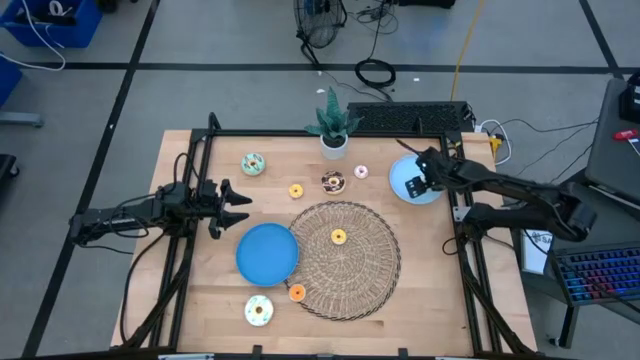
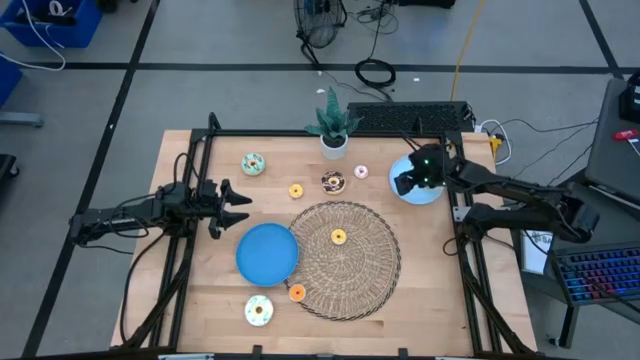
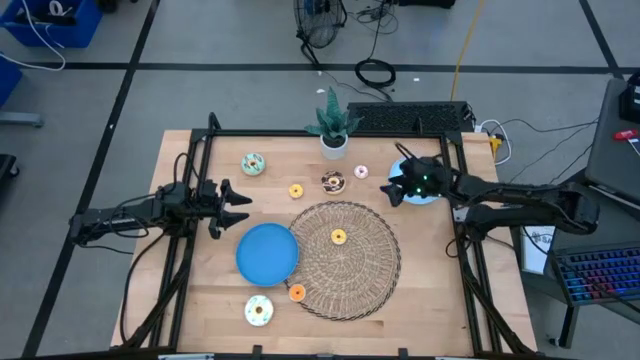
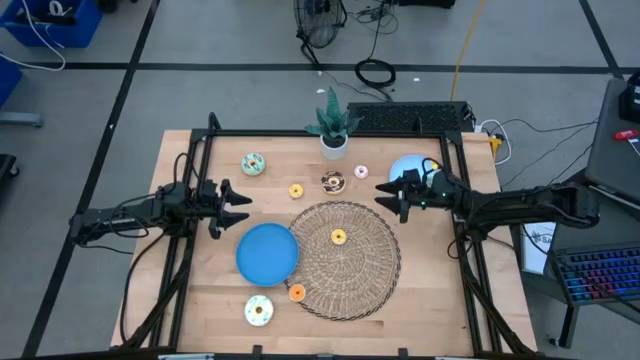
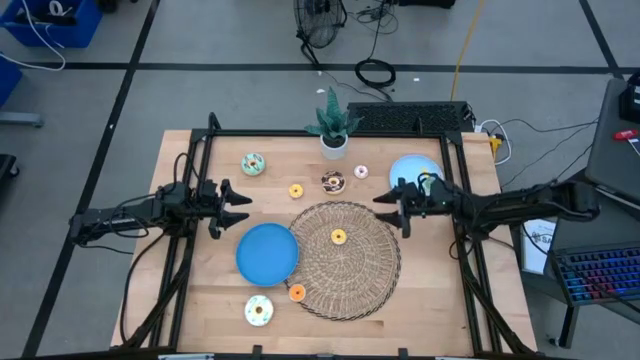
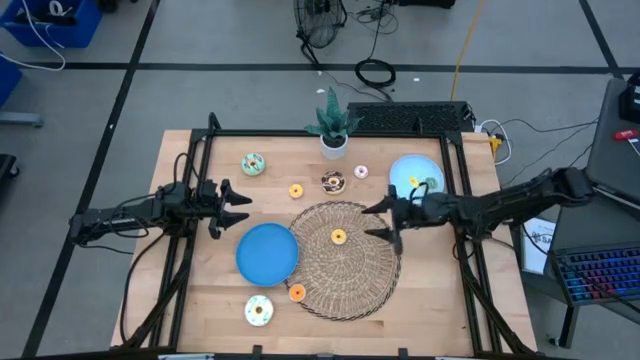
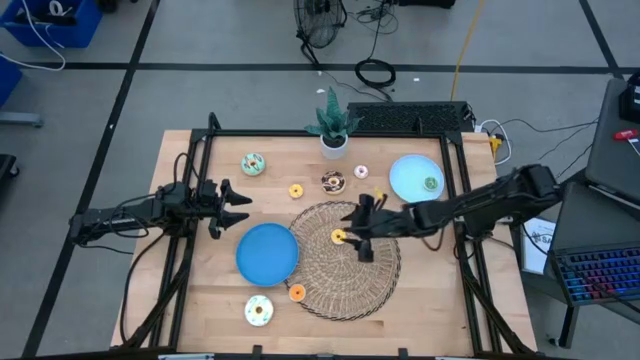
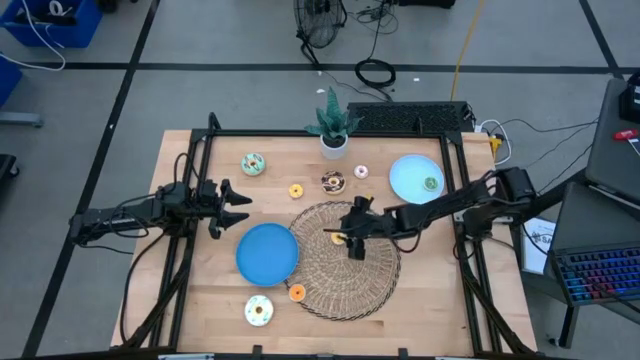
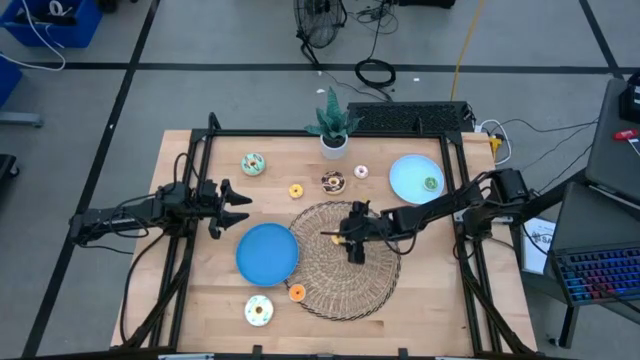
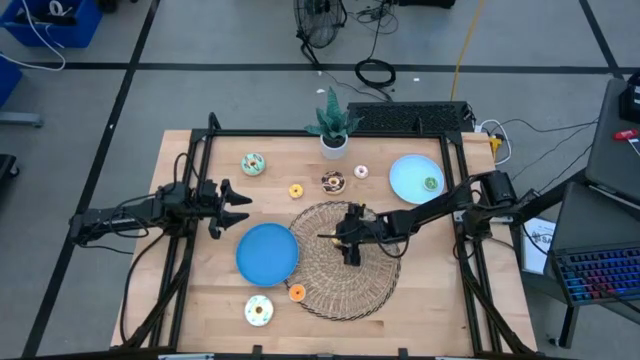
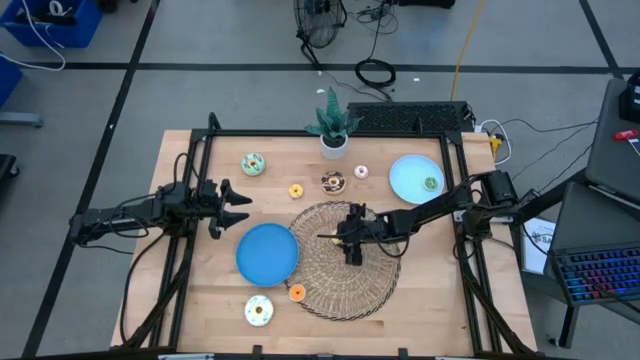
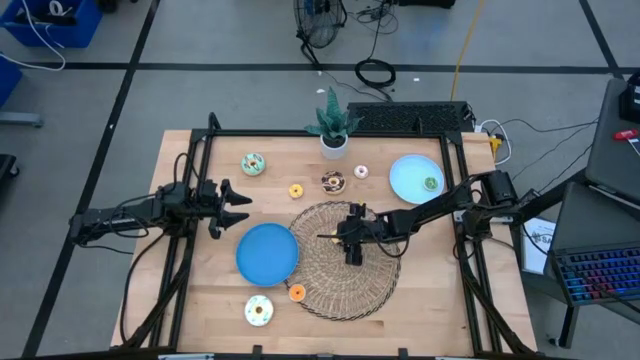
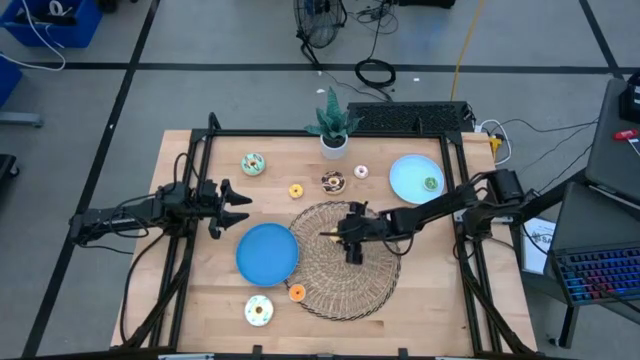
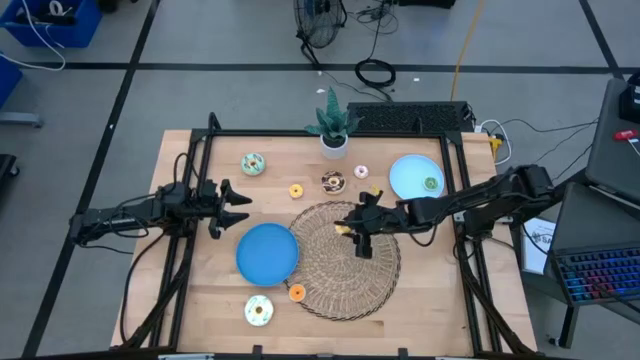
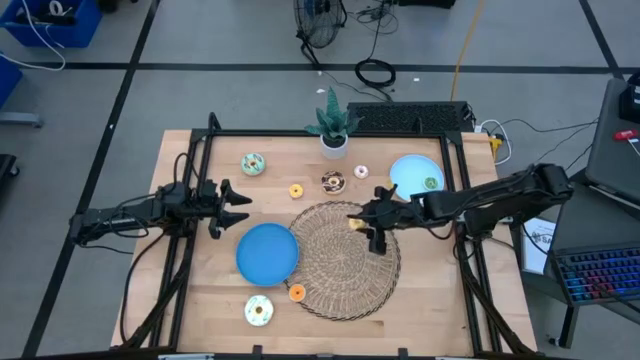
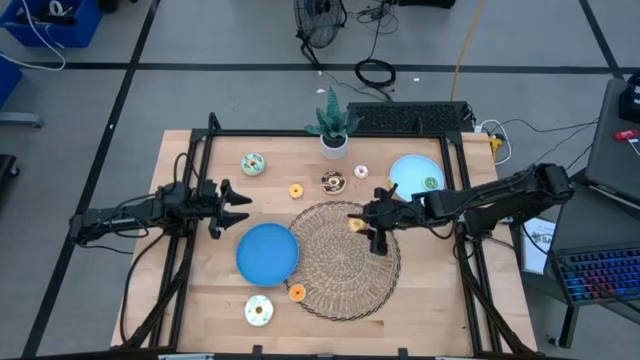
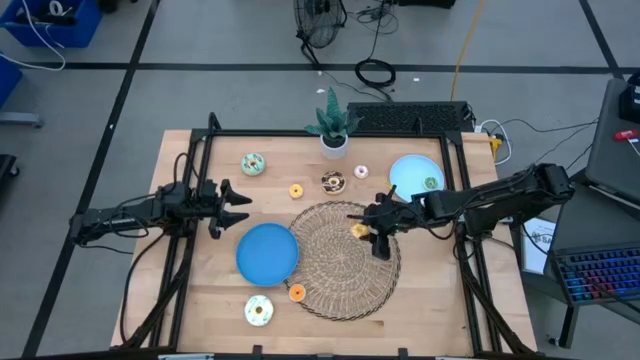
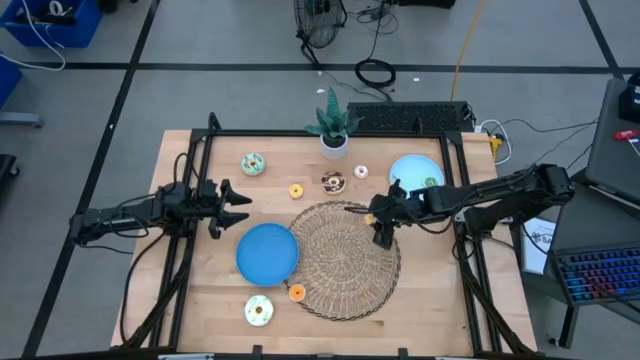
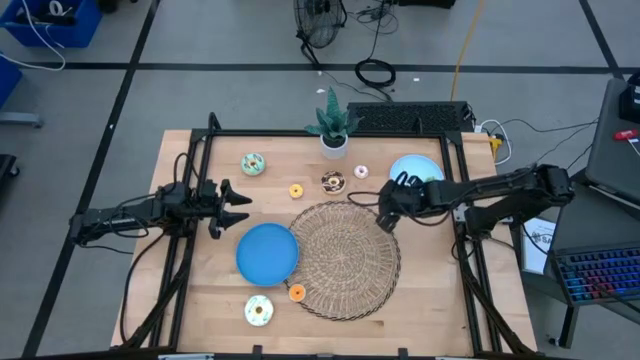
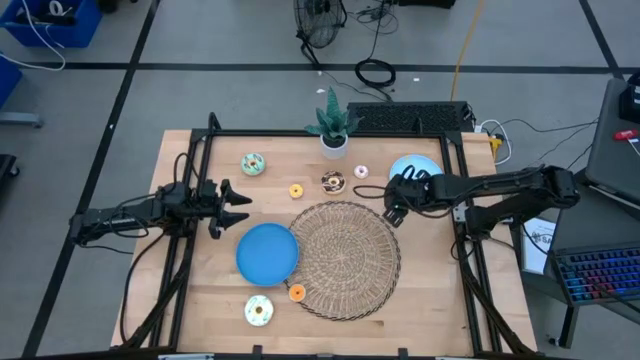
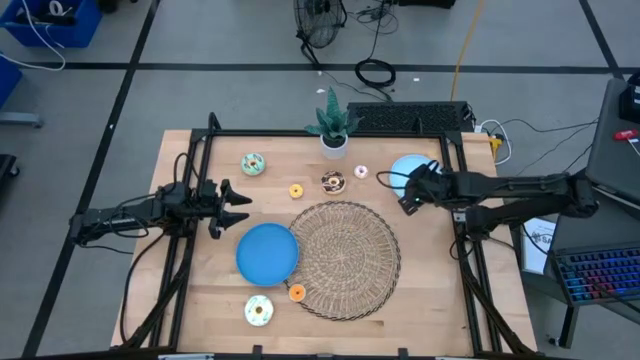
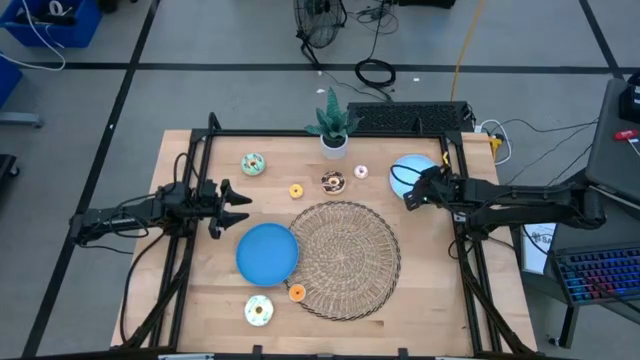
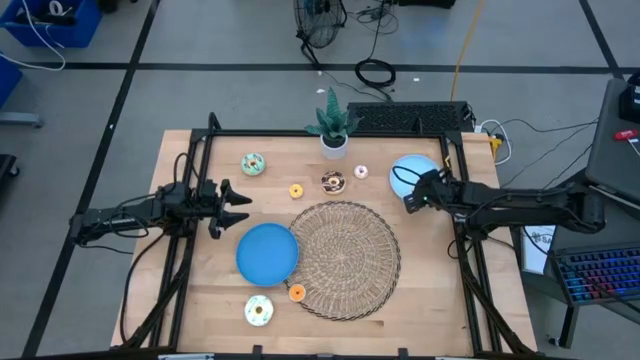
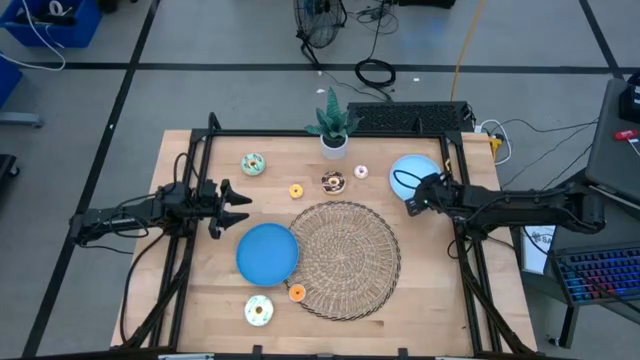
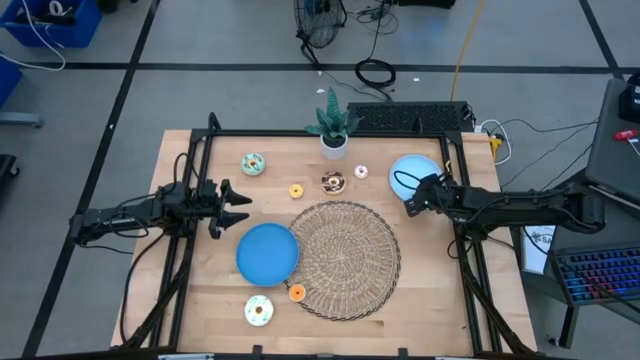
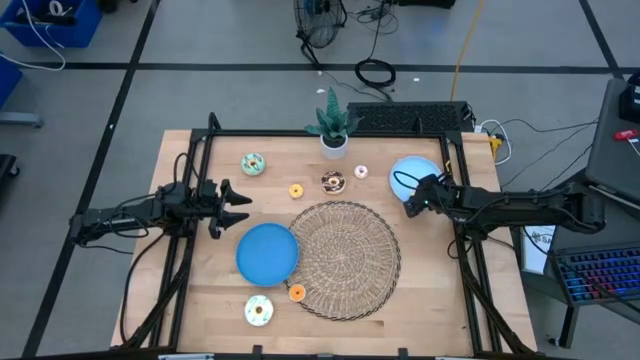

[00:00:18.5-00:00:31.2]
Task: Pick & Place donuts
Put the bottom small yellow donut on the light blue plate

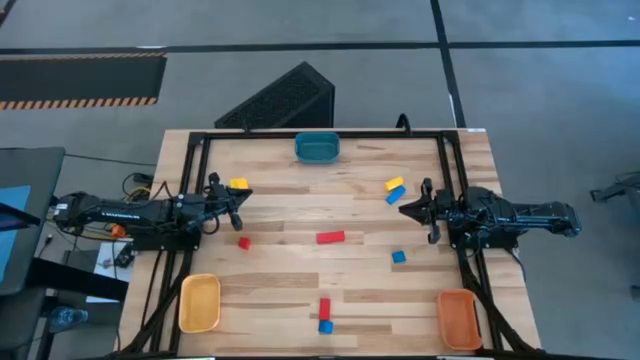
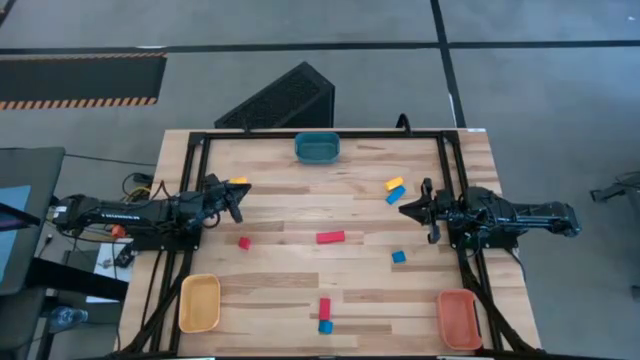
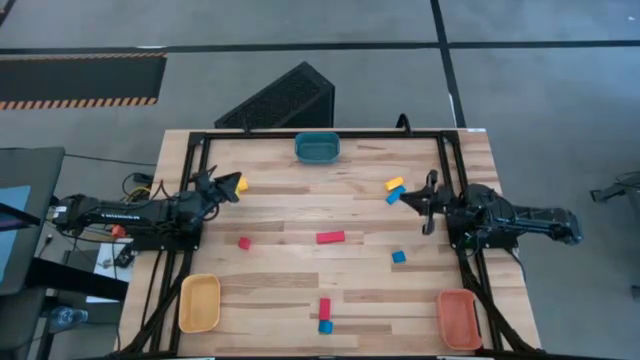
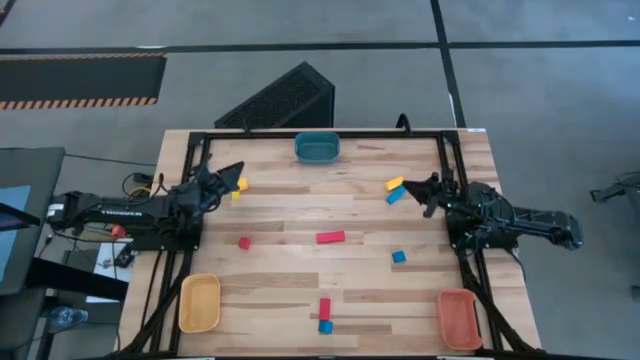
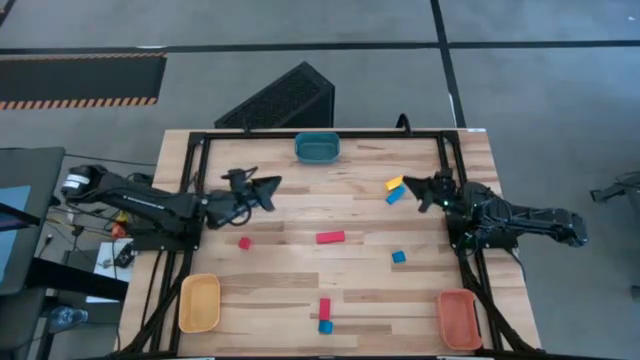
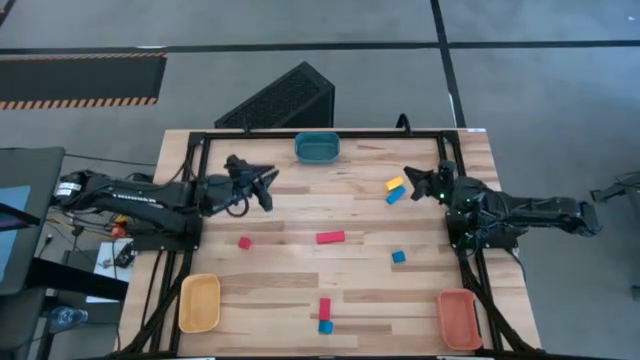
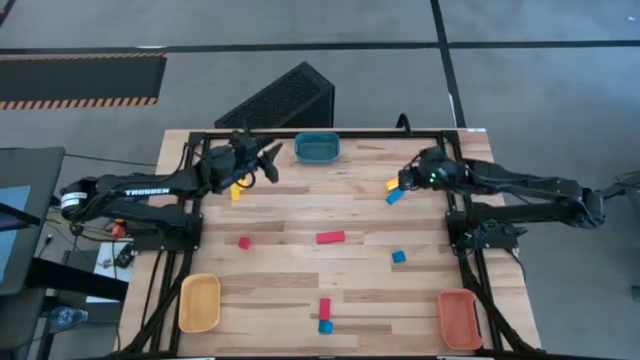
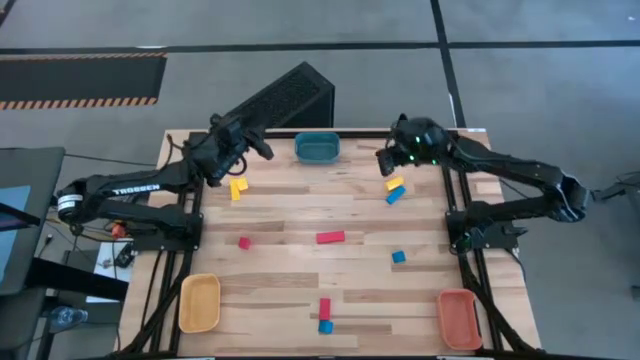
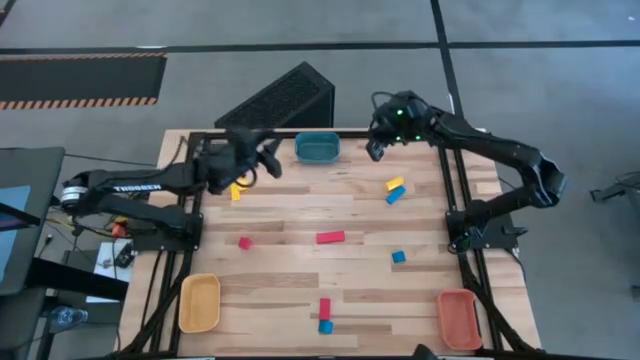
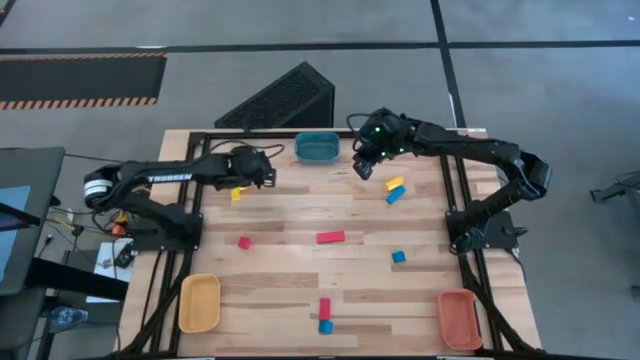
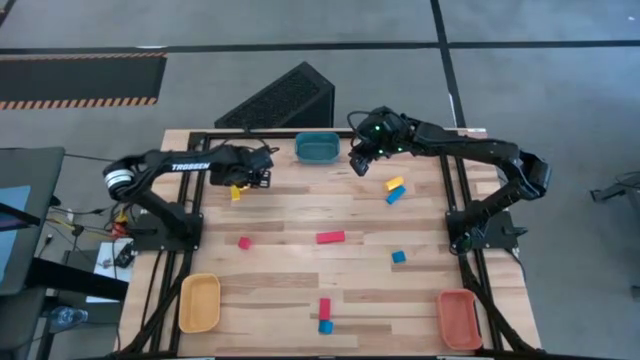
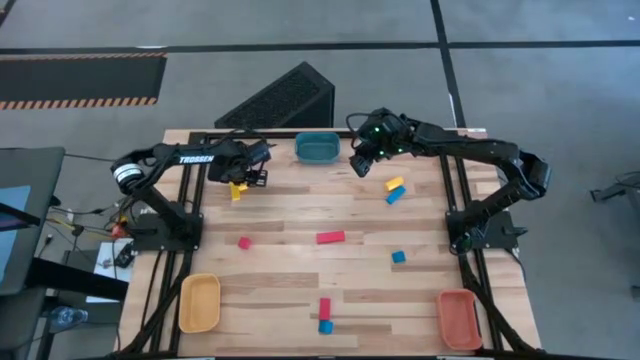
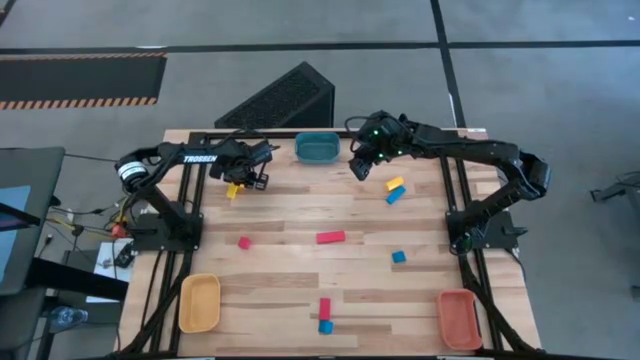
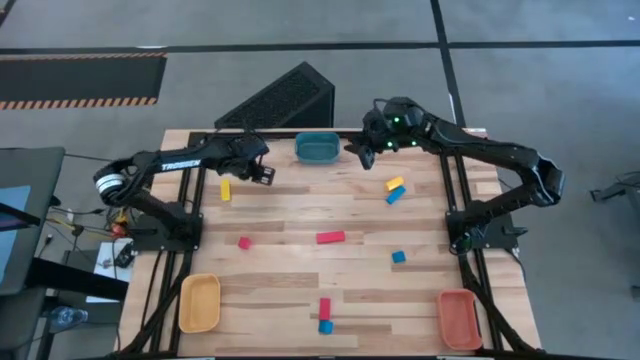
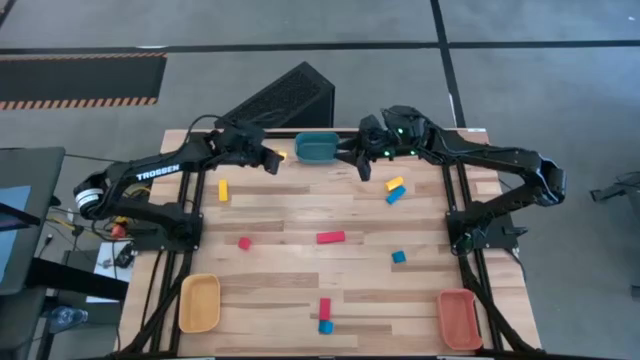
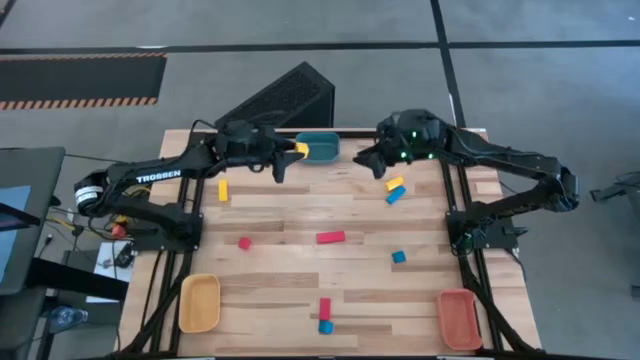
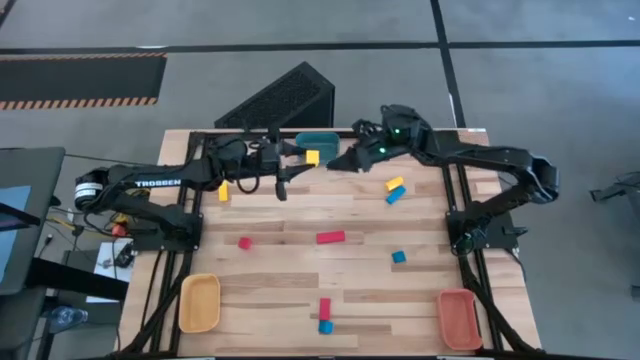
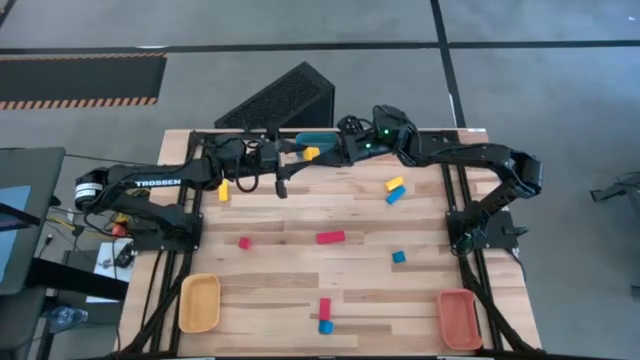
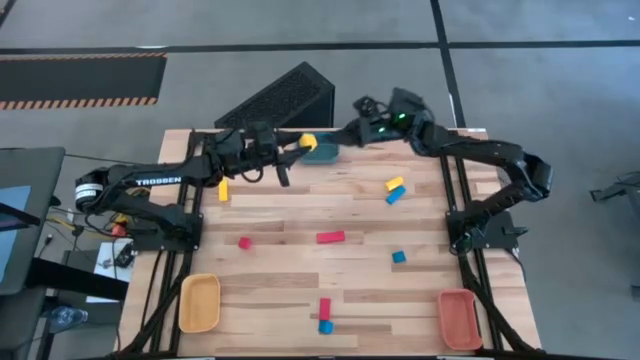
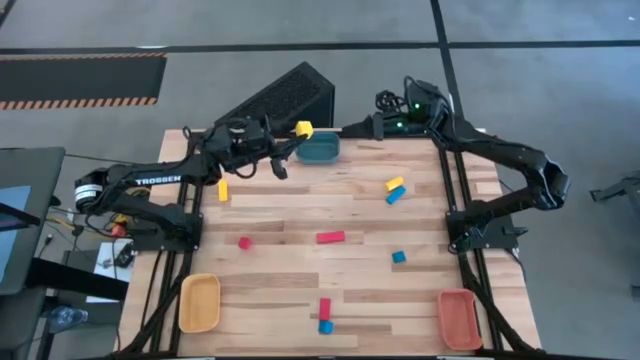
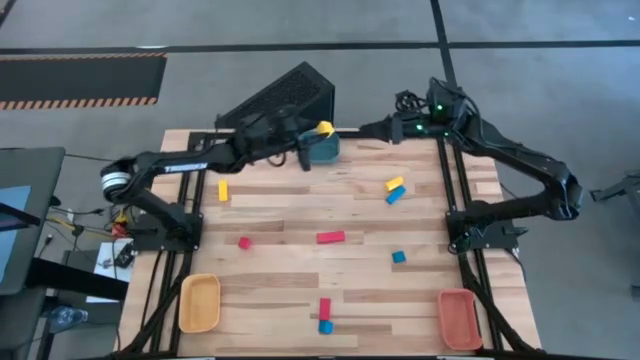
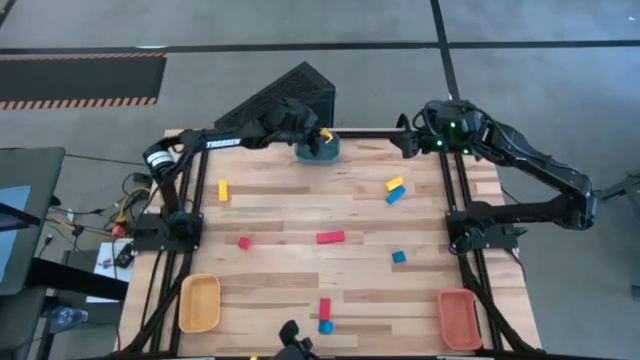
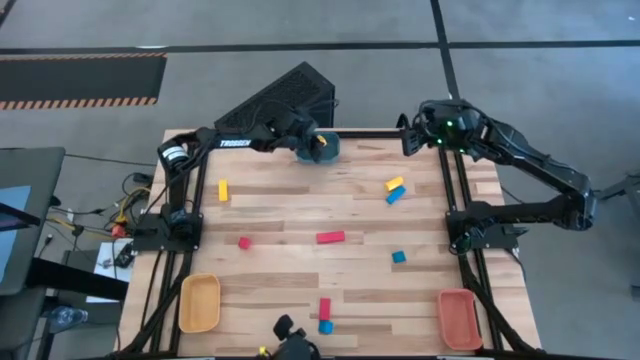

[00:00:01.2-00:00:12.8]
Task: Sort & place blocks by color
Put the top left yellow block into the blue bin
